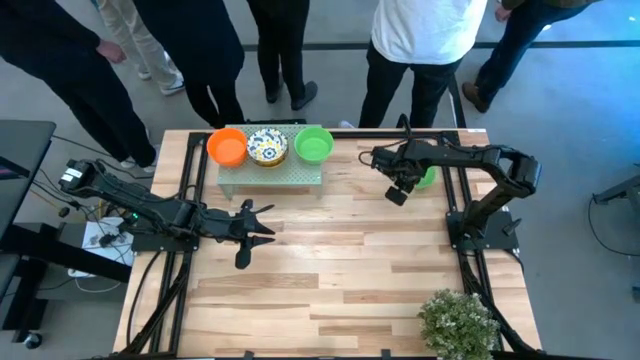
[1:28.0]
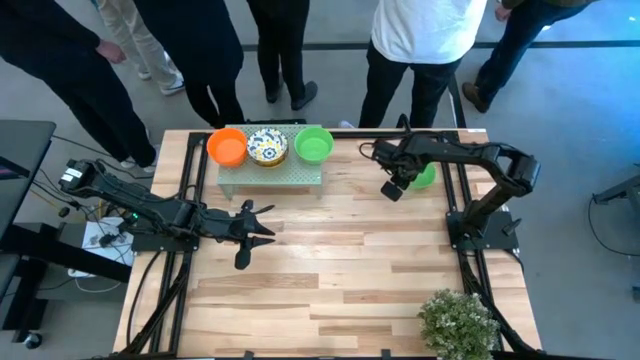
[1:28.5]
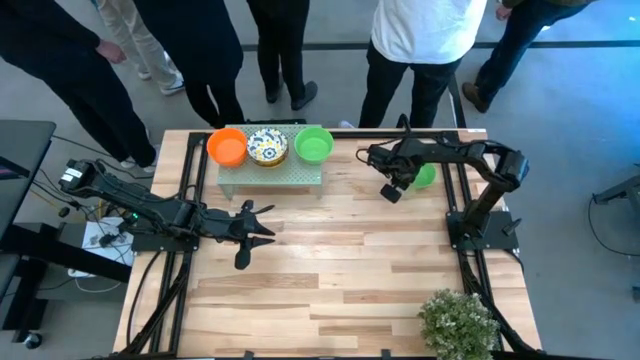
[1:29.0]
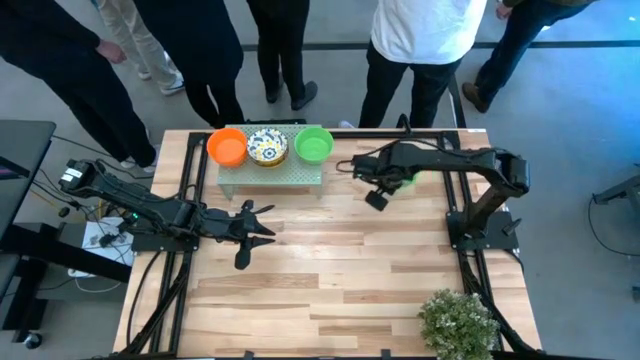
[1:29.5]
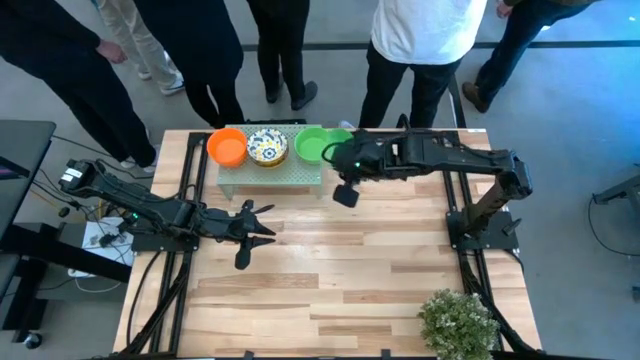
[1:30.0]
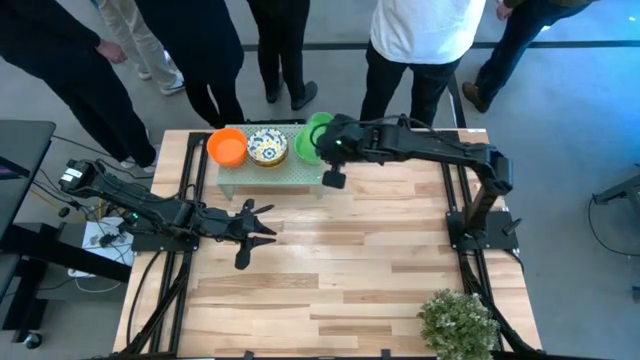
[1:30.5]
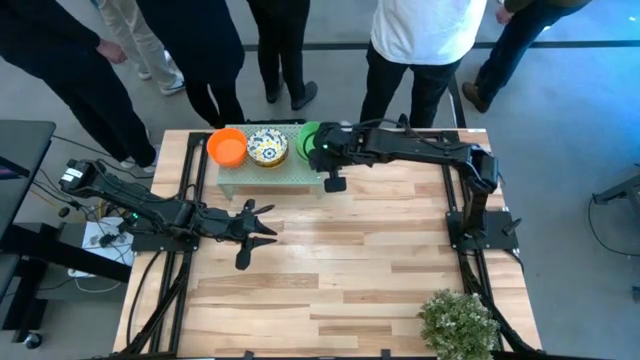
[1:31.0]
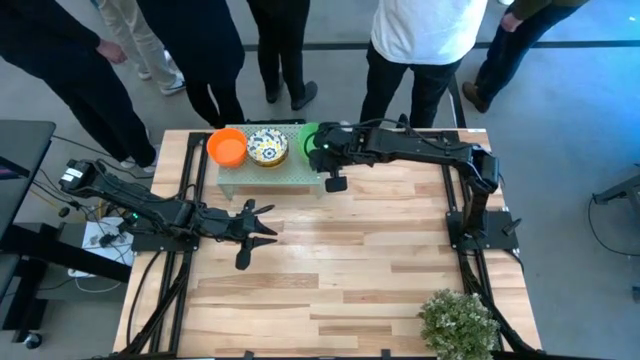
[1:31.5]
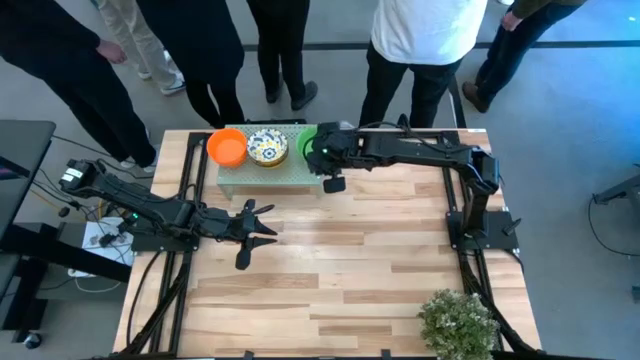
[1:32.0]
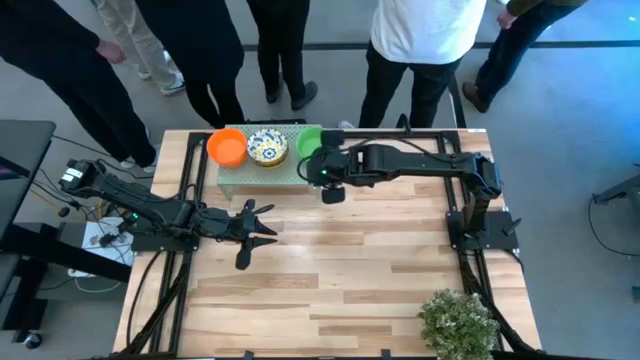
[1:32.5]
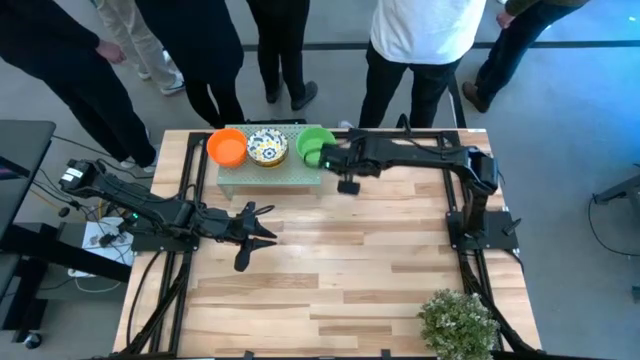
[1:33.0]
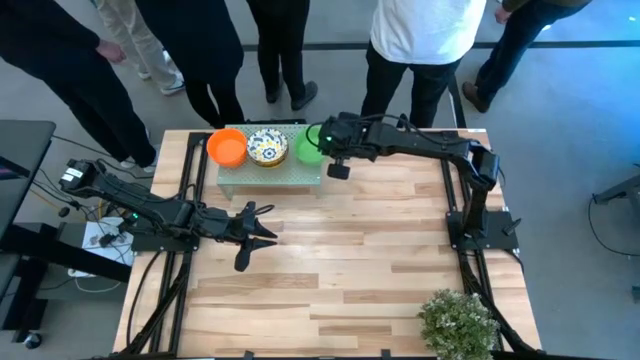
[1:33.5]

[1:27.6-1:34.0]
Task: Pick & Place Mini bowls
Stack the green bowl on top of the other green bowl on the shelf

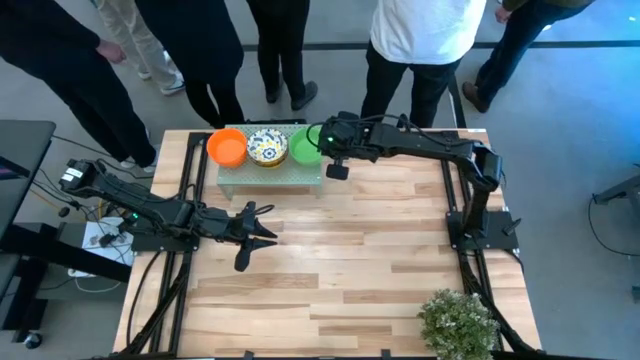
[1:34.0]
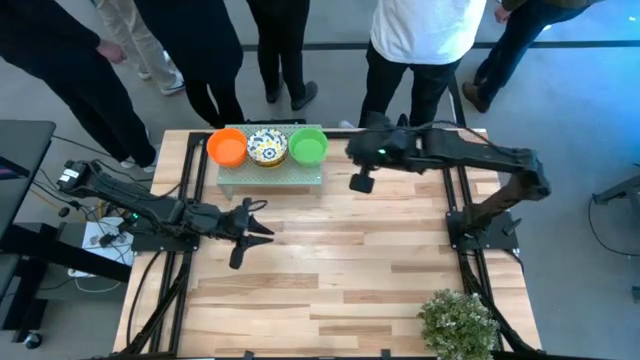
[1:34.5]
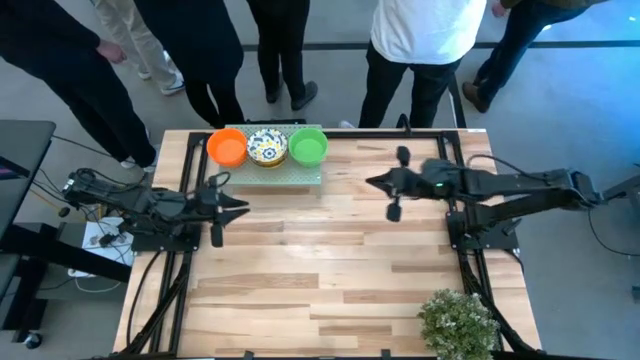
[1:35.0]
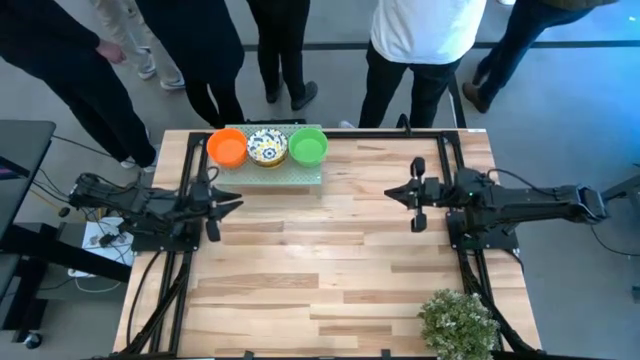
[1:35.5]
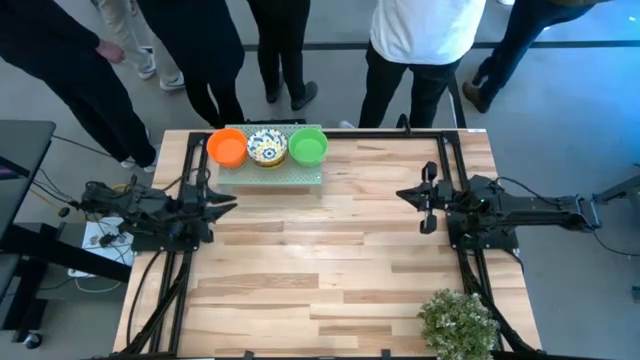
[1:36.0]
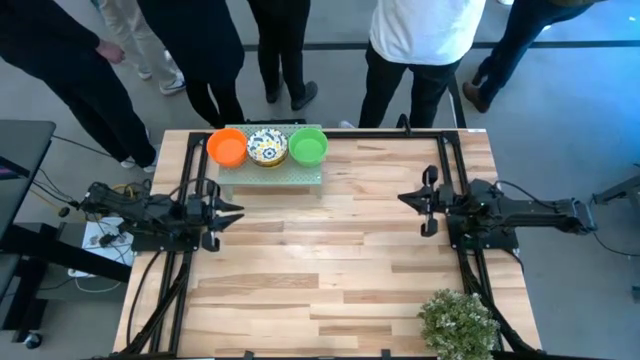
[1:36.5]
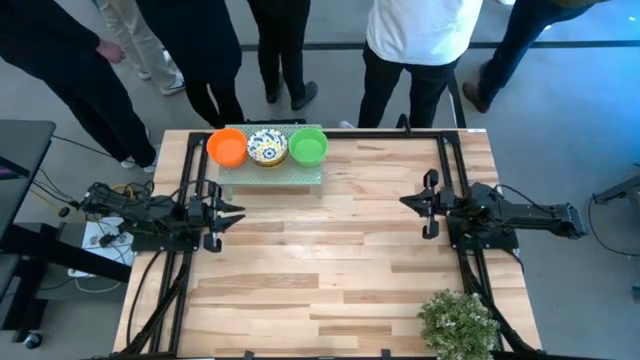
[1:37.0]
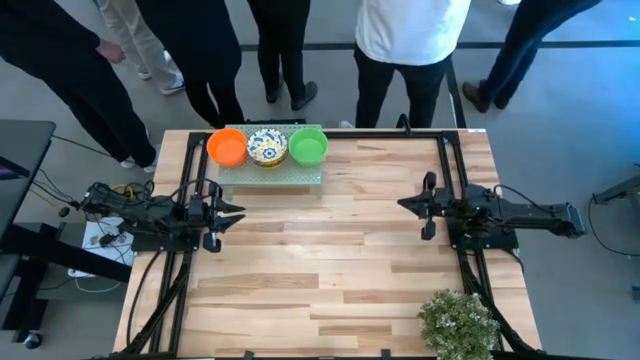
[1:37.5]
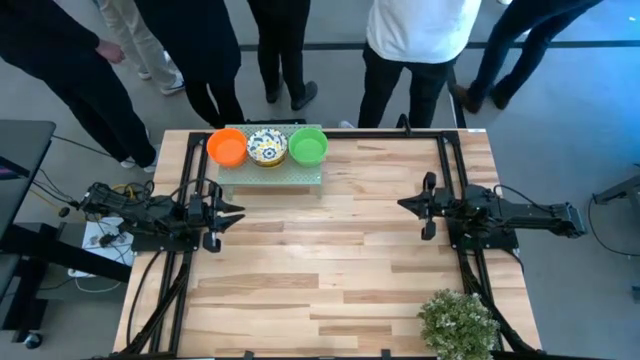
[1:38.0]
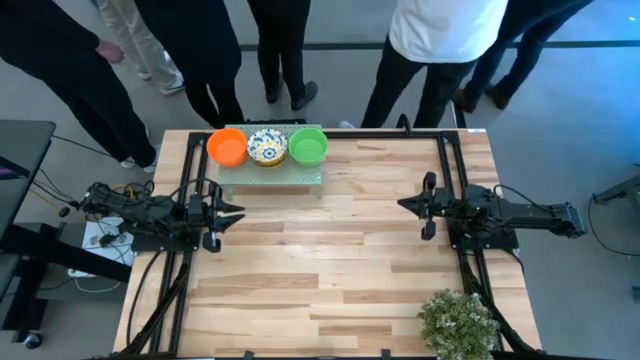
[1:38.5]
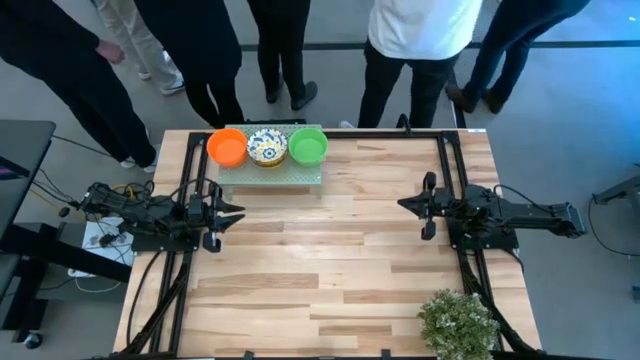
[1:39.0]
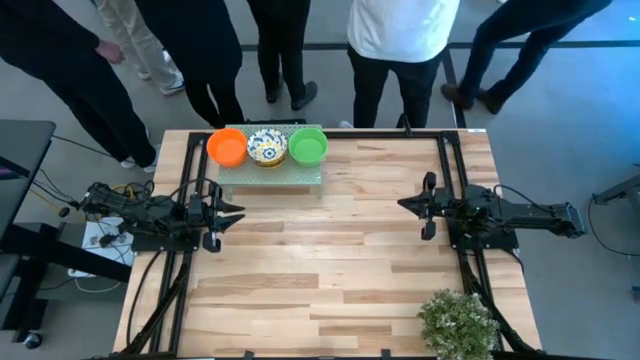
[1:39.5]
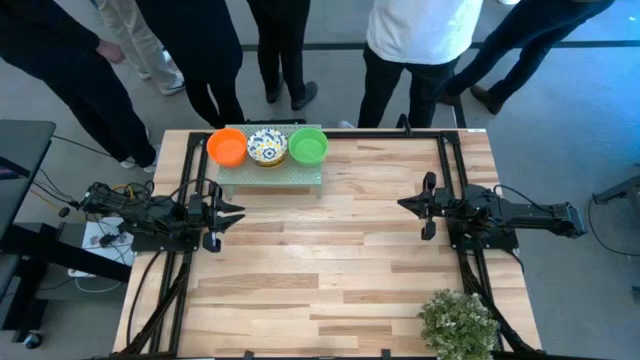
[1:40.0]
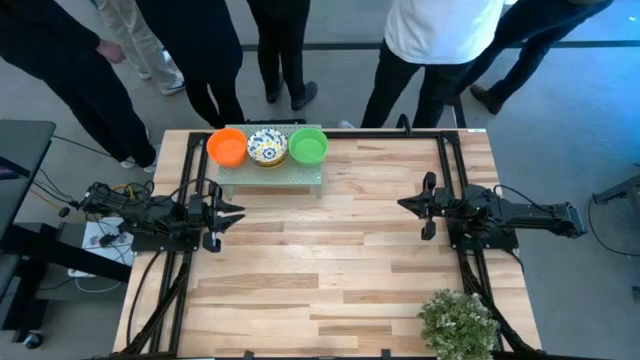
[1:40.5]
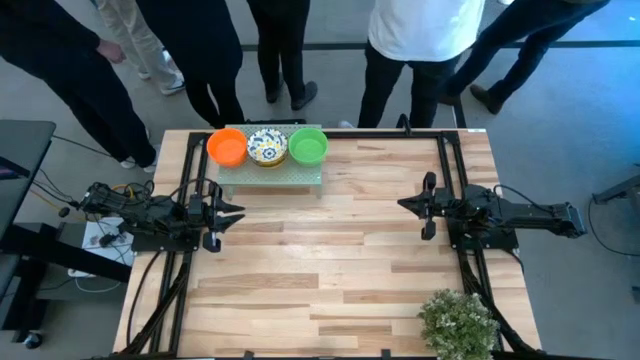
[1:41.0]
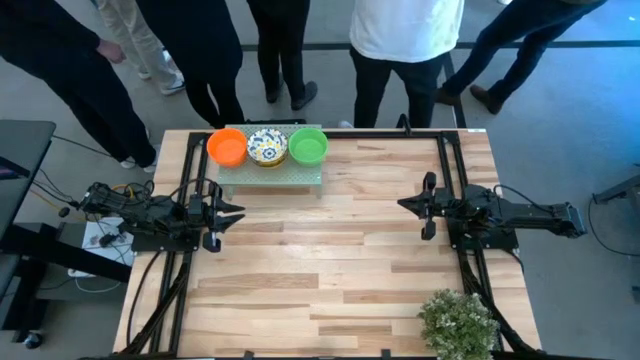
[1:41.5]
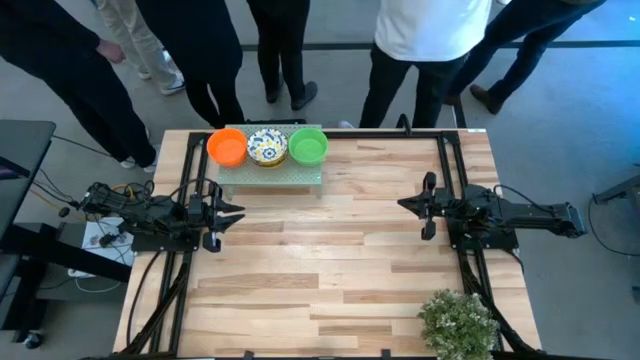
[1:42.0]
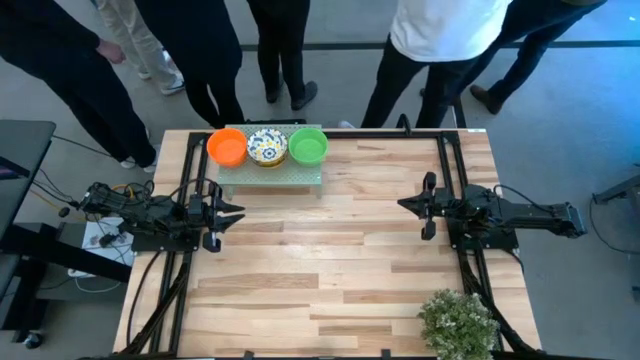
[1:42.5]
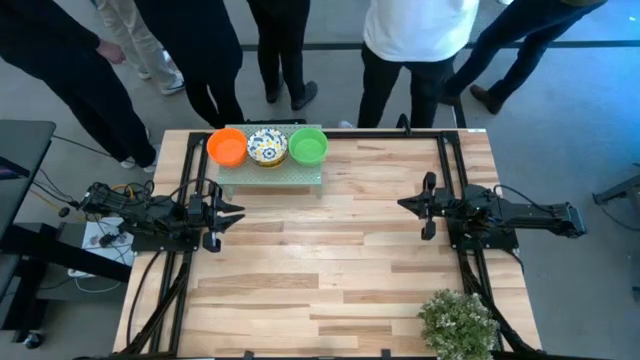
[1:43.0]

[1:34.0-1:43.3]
Return to Home Position

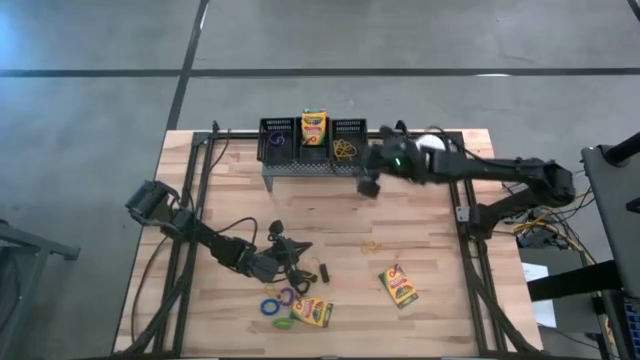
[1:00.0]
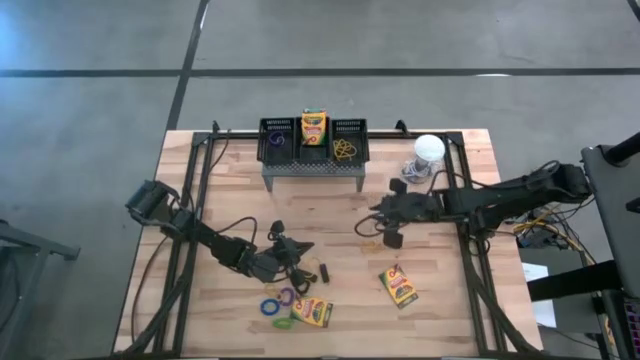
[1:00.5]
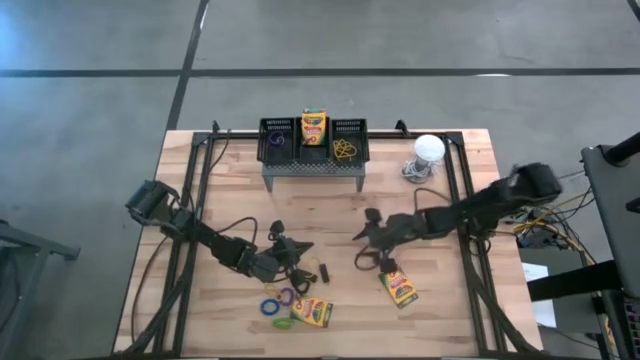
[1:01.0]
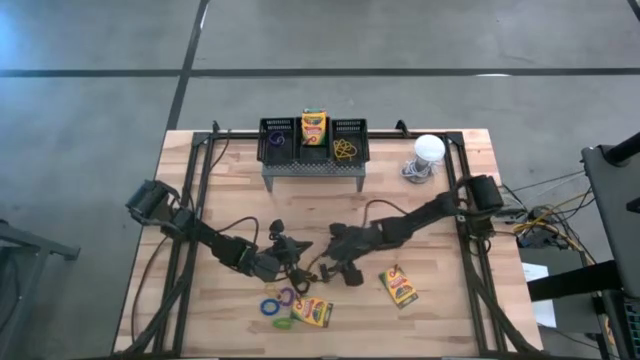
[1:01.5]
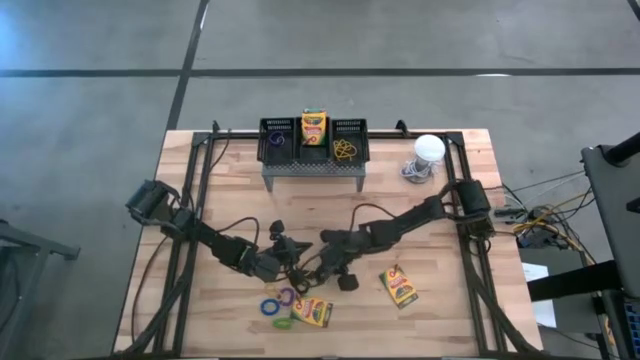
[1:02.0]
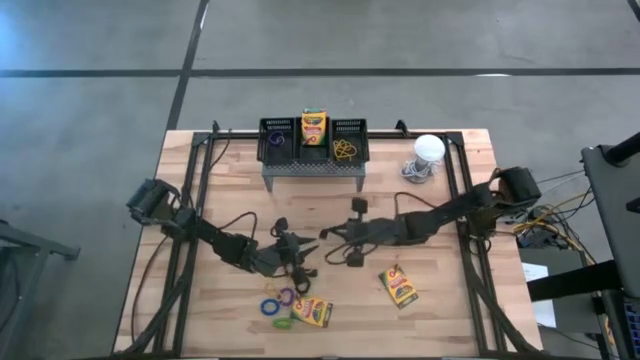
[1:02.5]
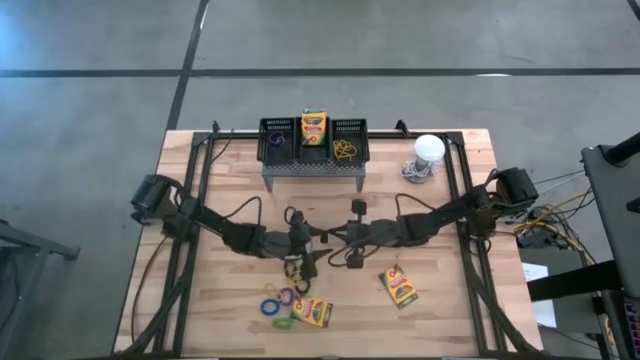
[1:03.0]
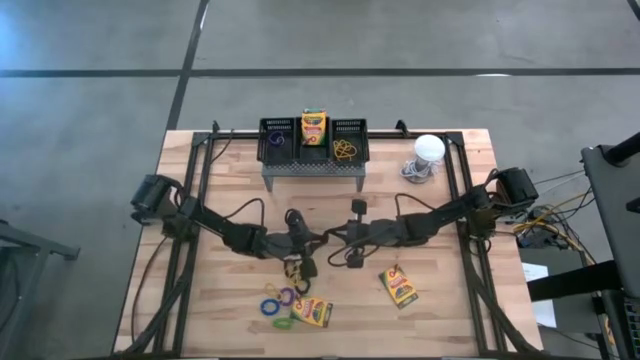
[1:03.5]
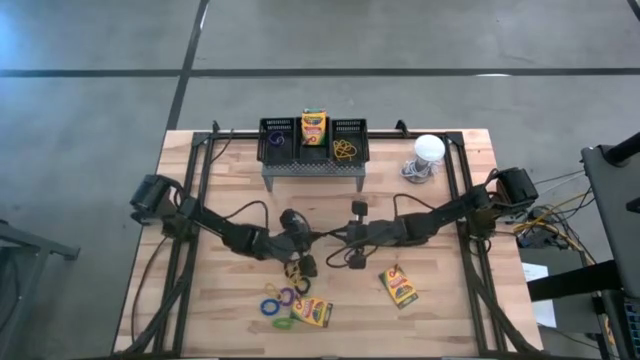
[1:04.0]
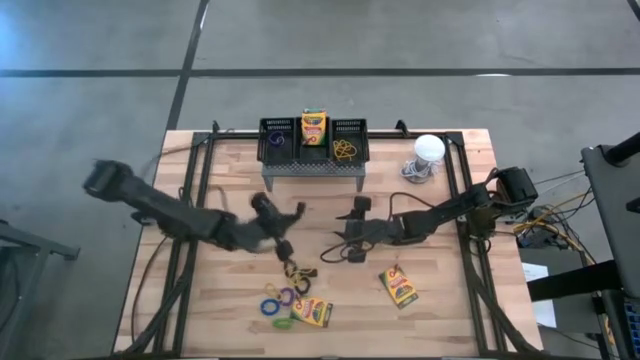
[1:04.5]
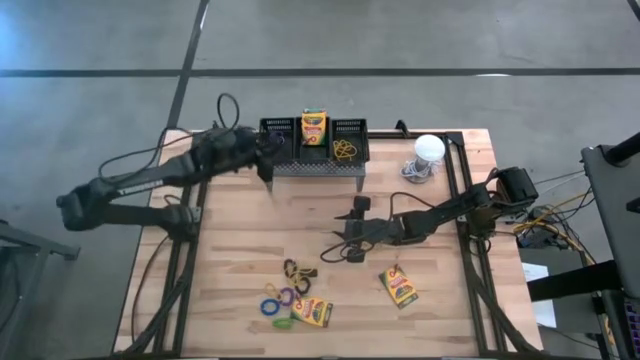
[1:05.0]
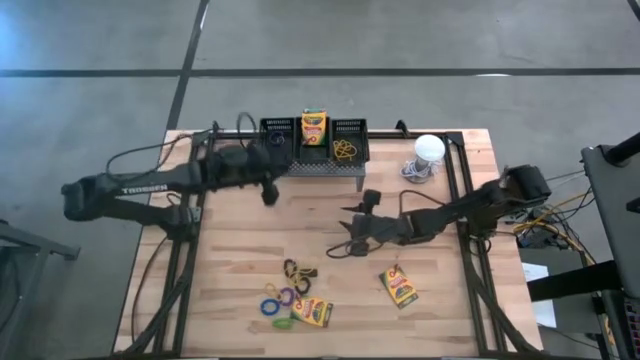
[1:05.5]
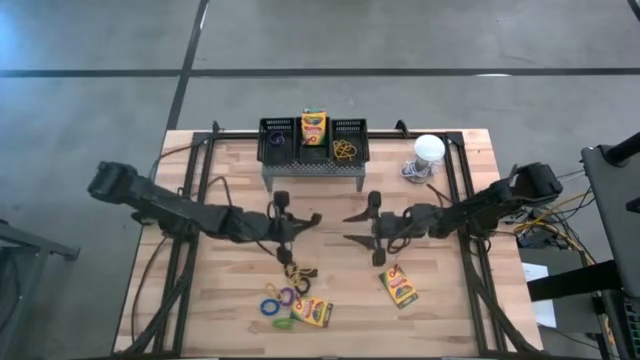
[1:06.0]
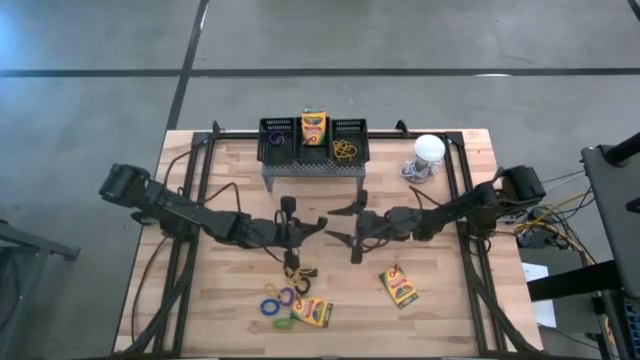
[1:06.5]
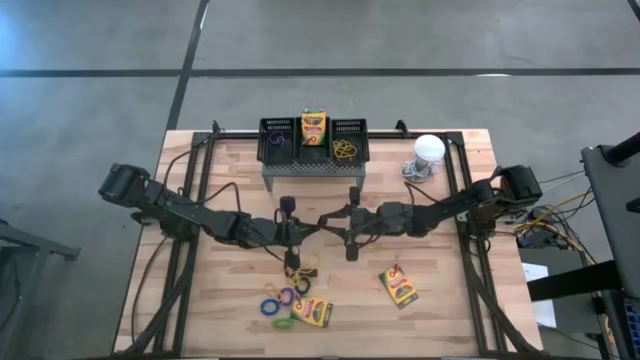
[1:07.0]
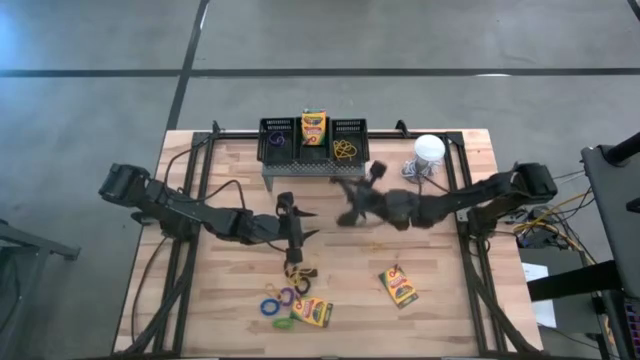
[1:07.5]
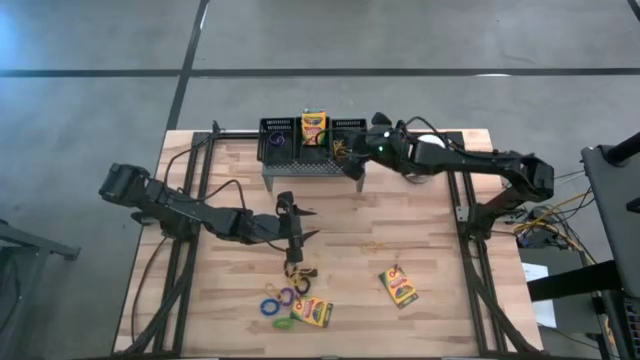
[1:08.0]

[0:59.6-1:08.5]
Task: Pick & Place Office Desk Supplies
Put the black rubber band into the right black basket on the shelf
